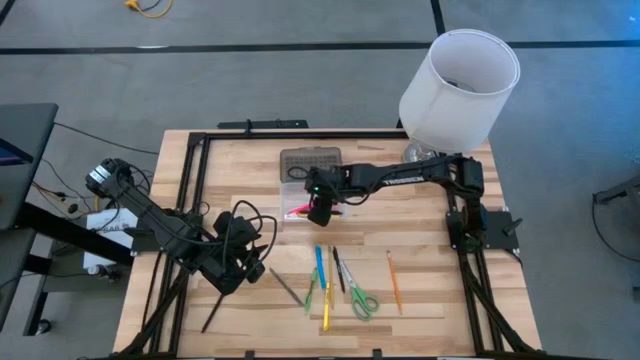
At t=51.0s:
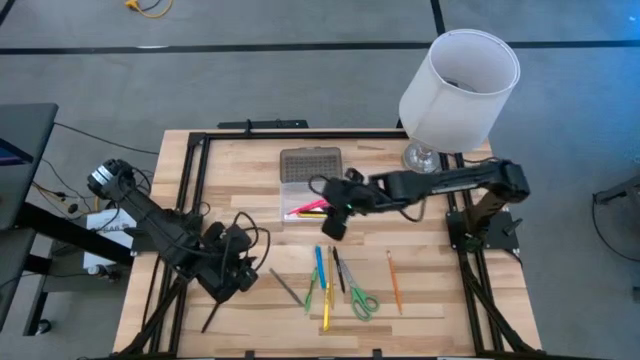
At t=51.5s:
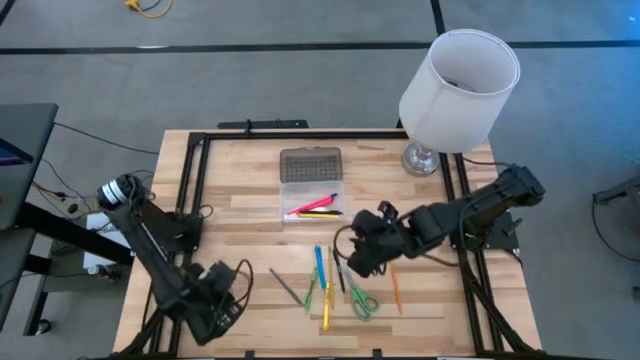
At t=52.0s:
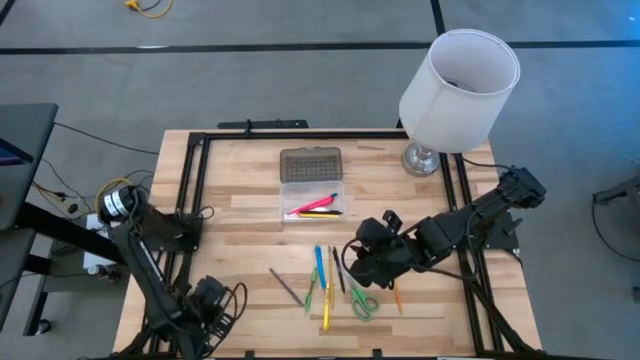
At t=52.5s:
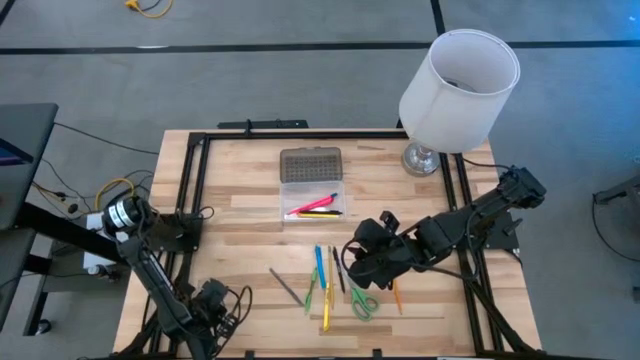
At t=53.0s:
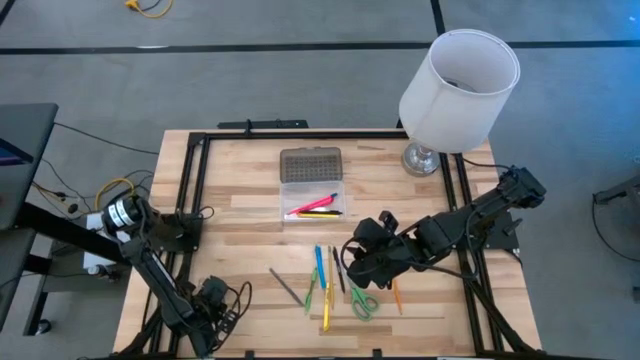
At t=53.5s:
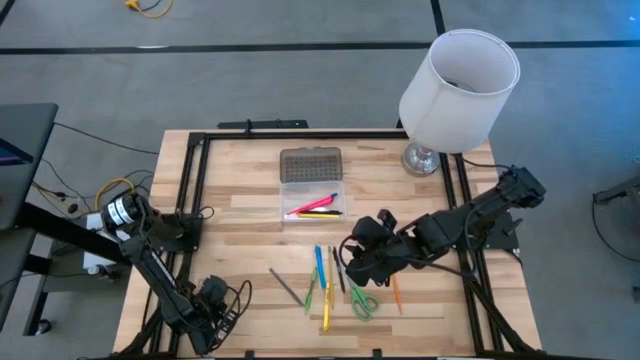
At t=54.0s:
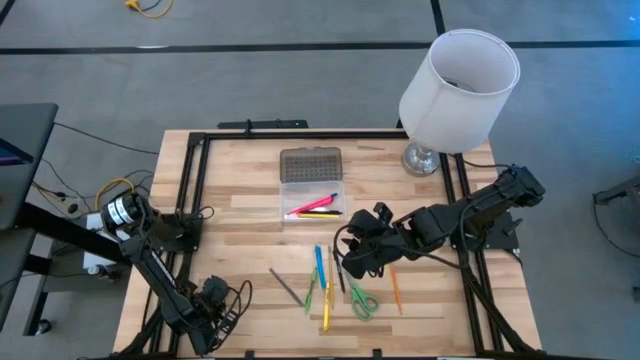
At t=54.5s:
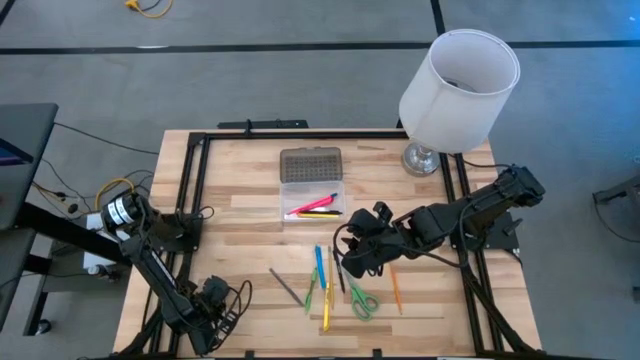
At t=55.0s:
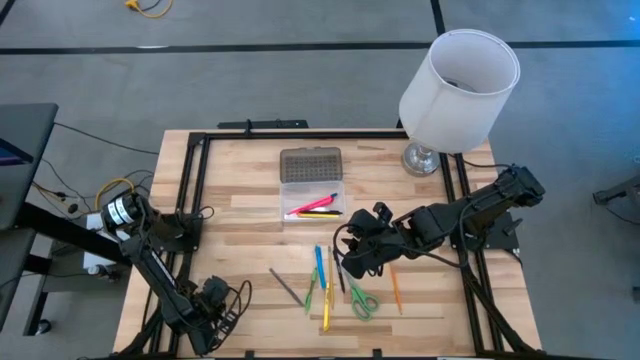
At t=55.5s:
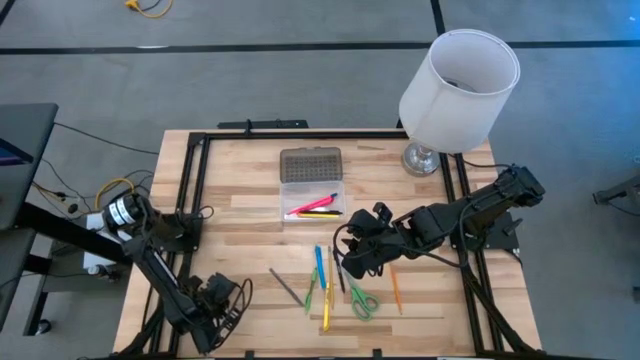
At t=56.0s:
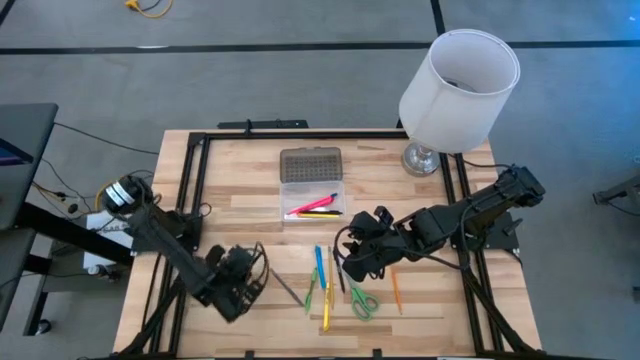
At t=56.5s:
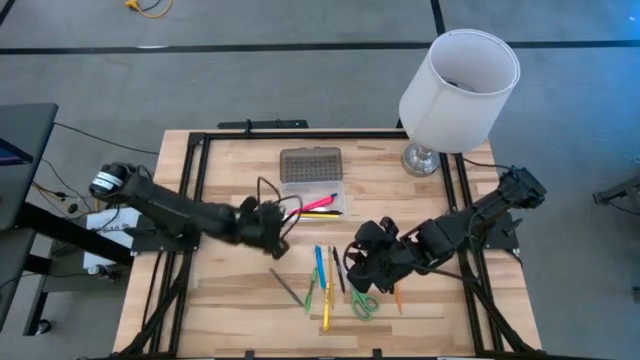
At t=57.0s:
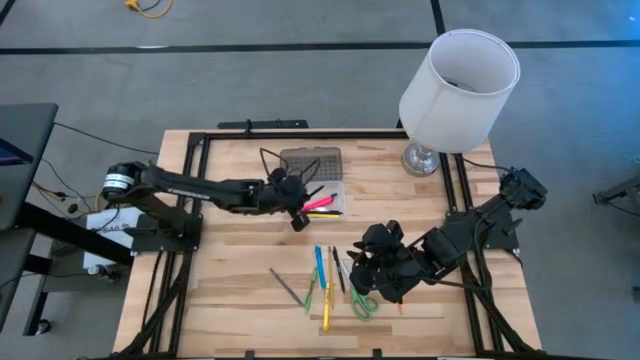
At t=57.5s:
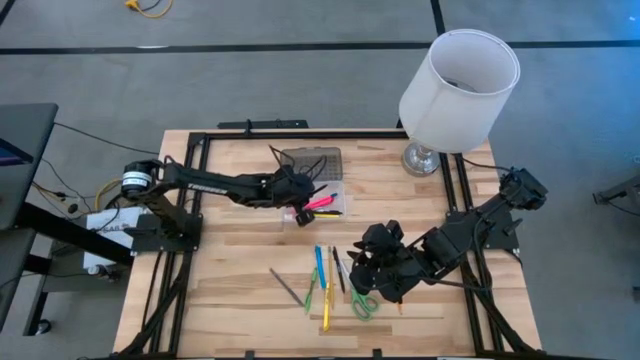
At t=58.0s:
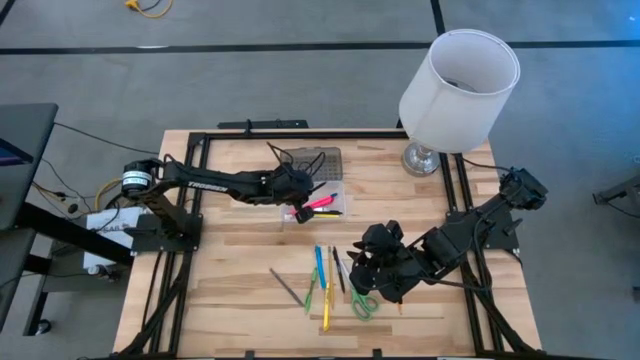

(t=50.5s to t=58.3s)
Task: Pick & place school supplies into a supply box
Put the right black pen into the supply box

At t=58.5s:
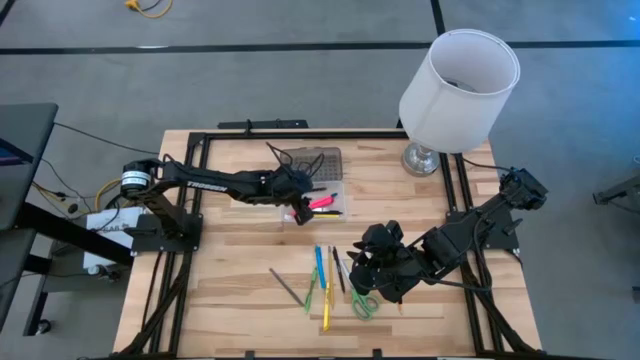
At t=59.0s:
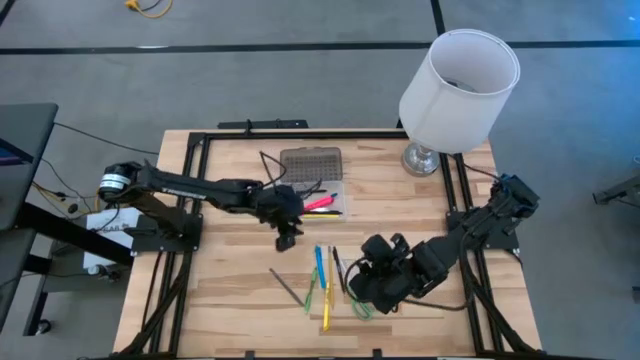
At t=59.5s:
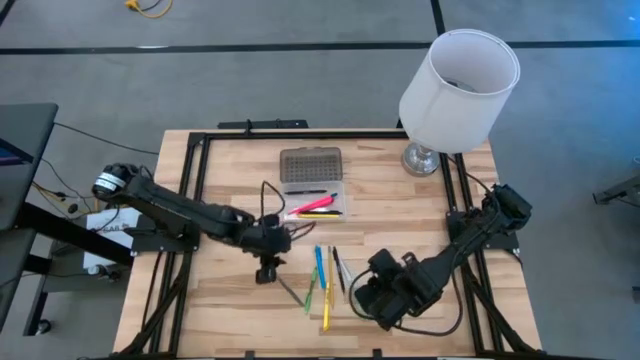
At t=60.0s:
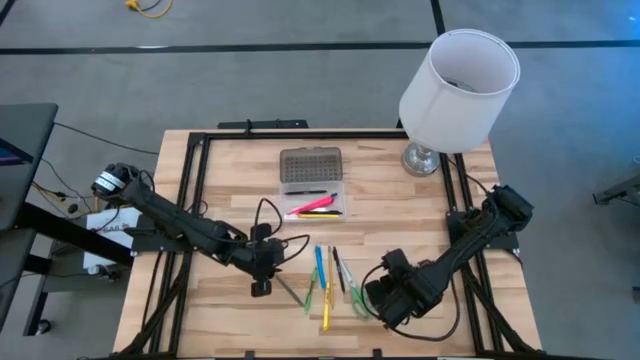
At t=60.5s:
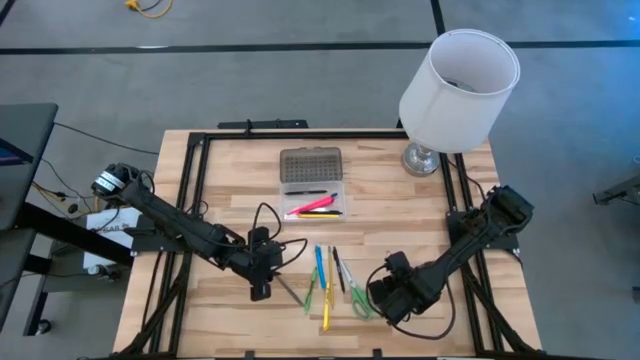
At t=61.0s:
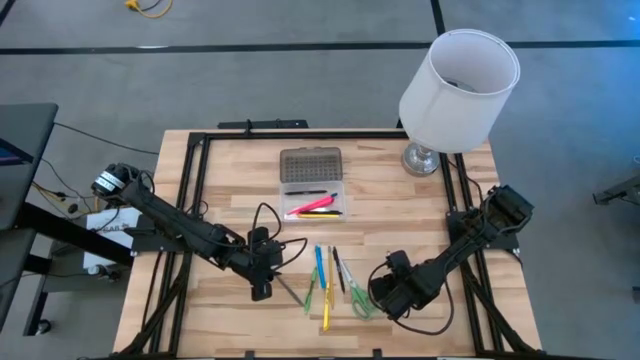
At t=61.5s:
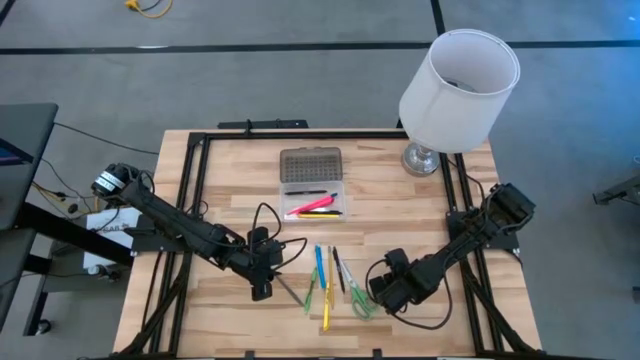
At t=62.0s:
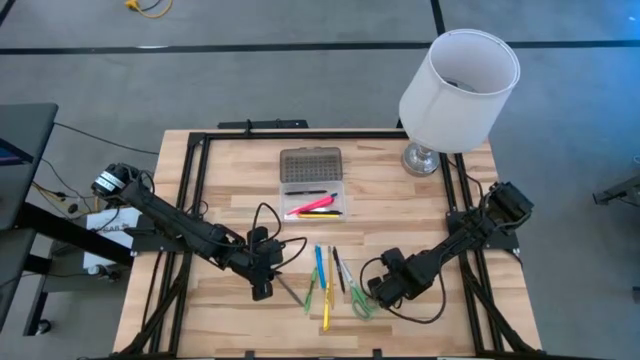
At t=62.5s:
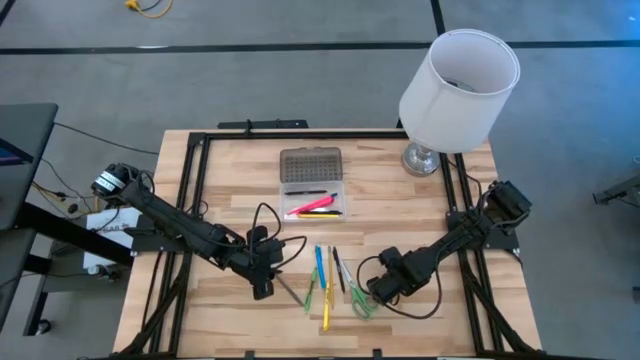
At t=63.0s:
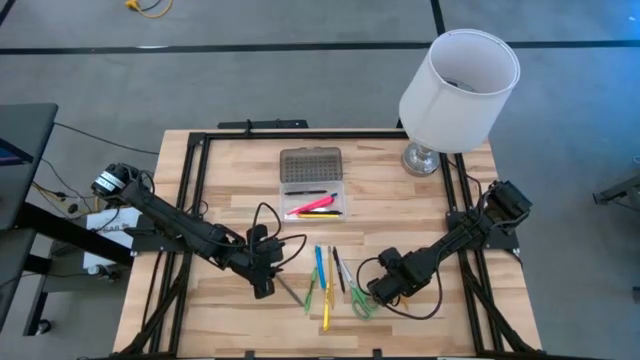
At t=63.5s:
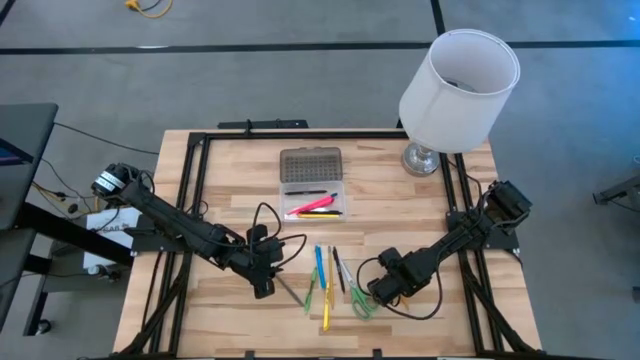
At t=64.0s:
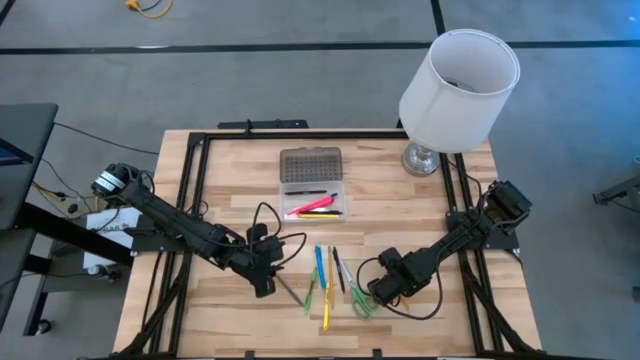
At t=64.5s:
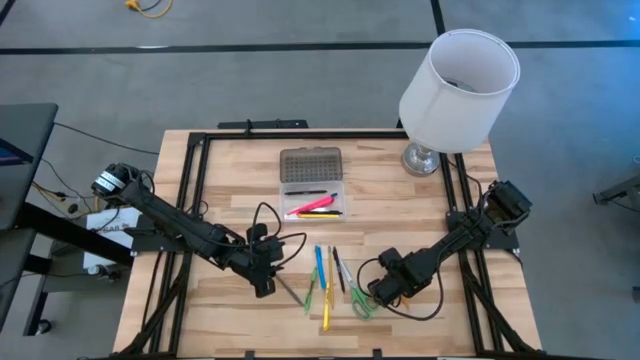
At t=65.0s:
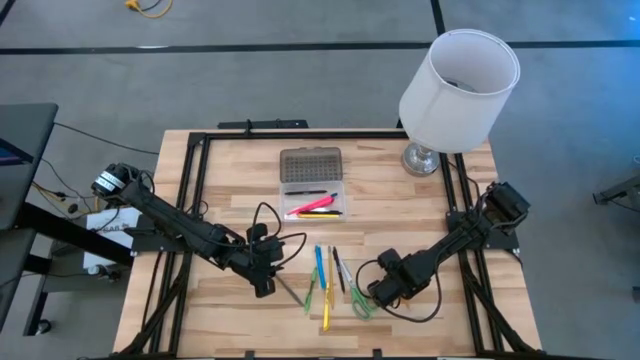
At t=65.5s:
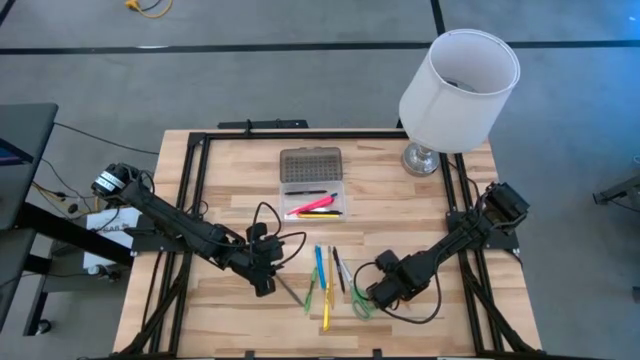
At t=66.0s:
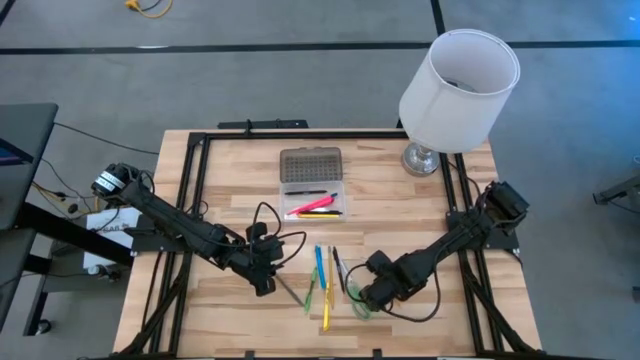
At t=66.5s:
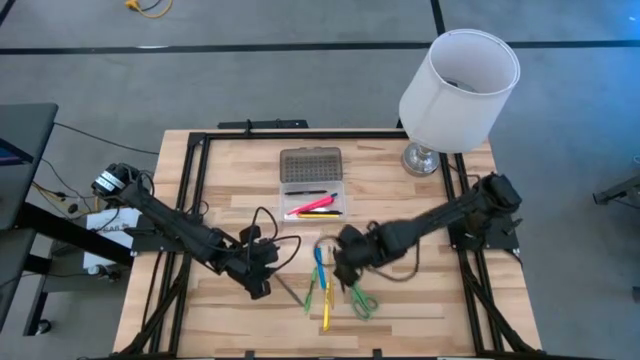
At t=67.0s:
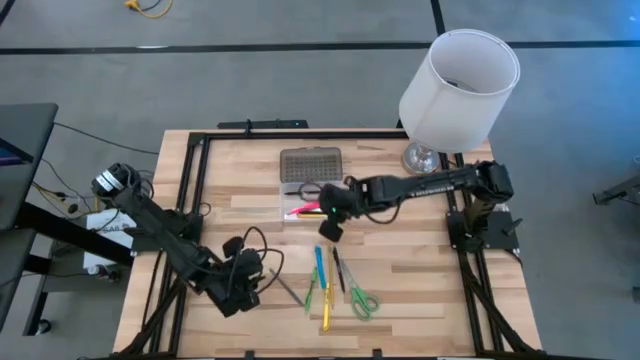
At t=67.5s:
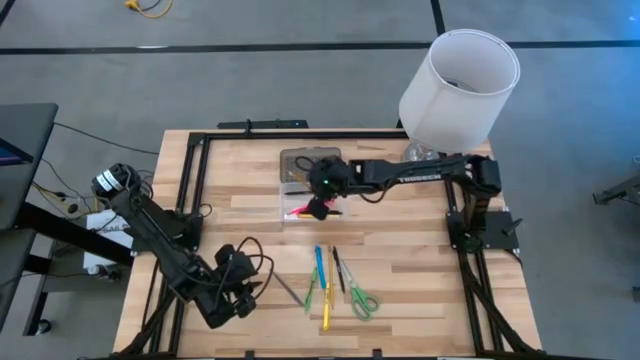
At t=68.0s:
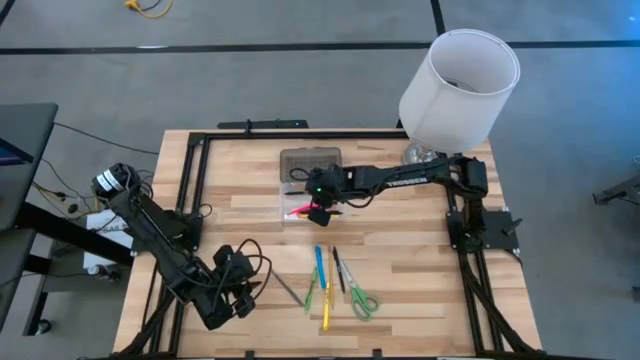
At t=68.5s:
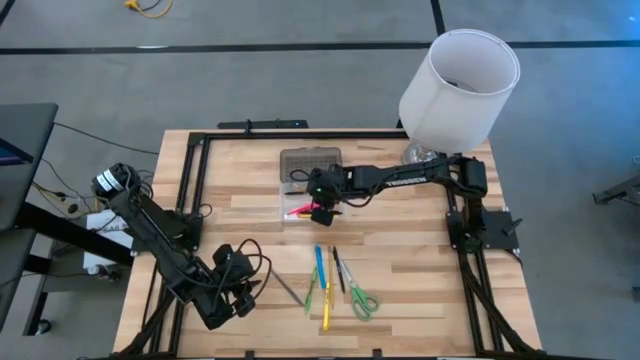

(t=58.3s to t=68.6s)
Put the orange pencil into the supply box

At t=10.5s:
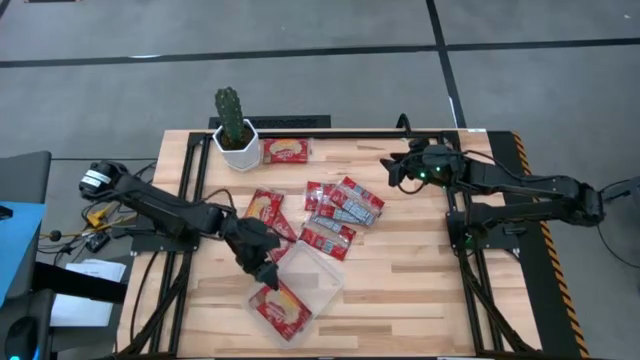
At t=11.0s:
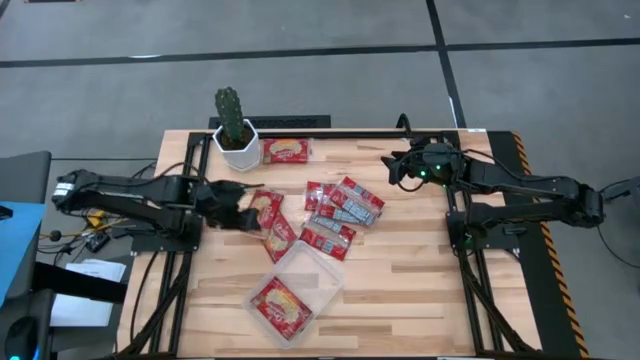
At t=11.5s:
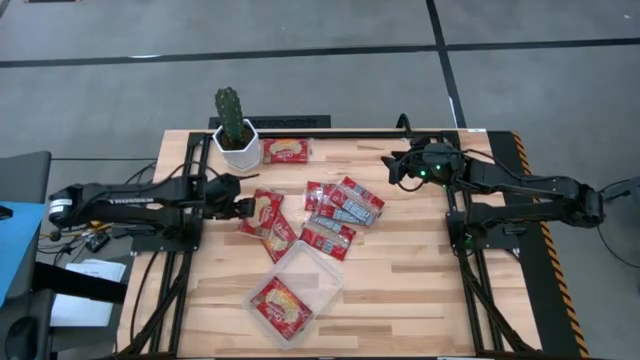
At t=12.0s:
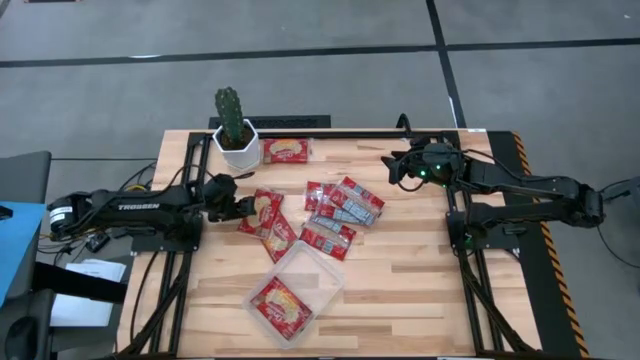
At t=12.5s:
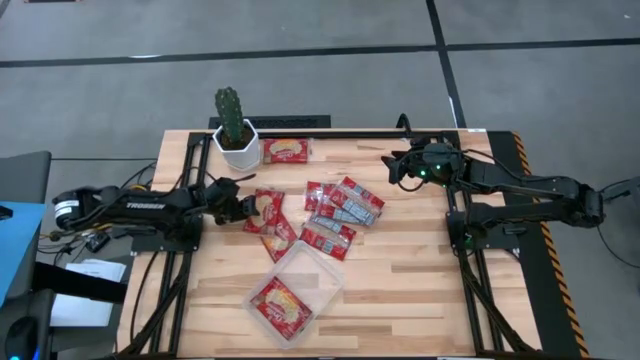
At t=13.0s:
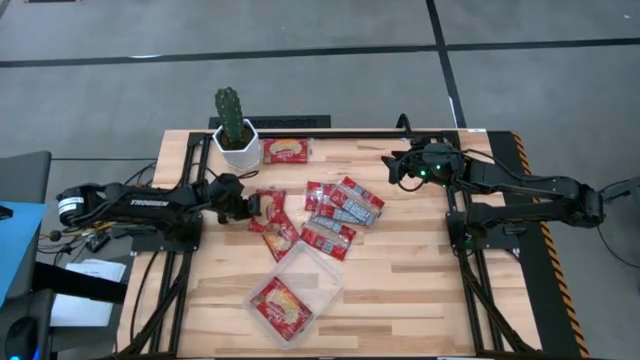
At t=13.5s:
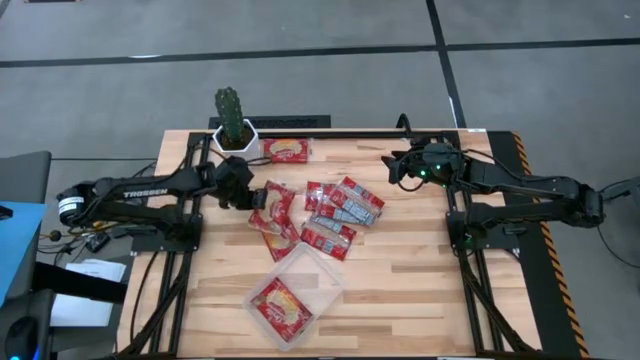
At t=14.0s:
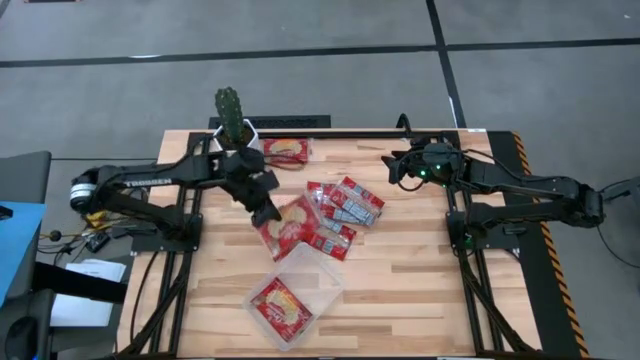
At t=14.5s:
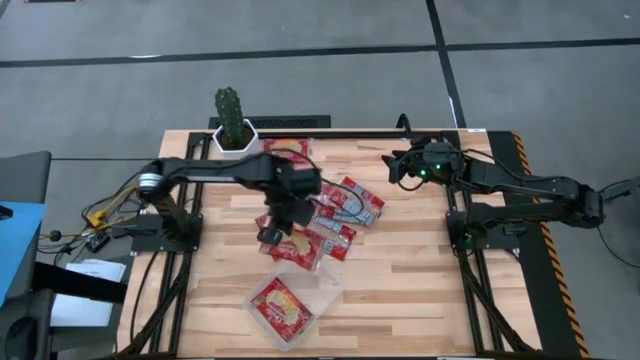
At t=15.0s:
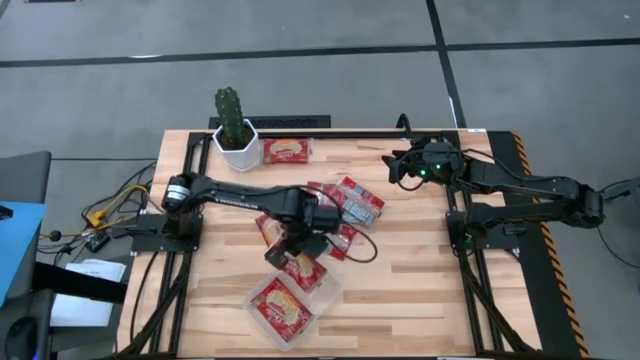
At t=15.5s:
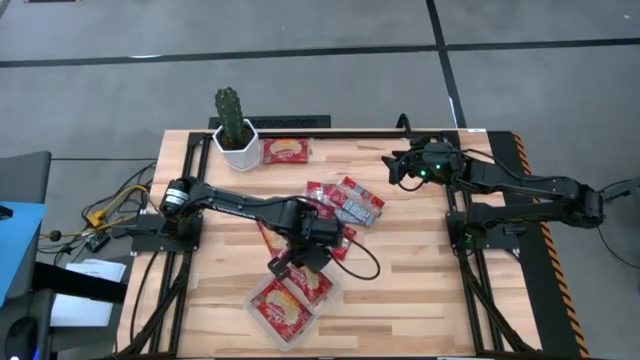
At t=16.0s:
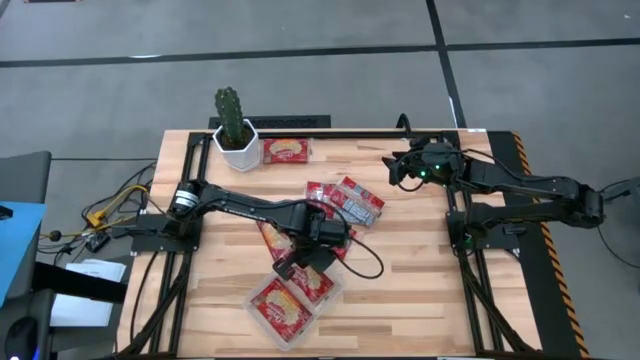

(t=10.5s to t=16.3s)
Task: Sort popcorn bags into baskets
Put the red popcorn bag into the transparent bin
